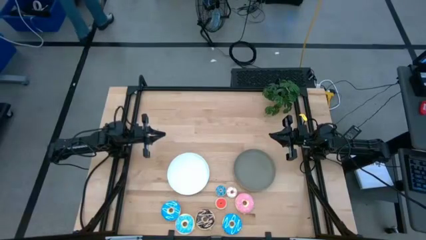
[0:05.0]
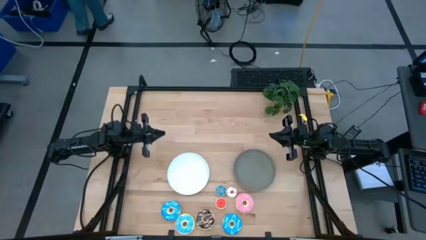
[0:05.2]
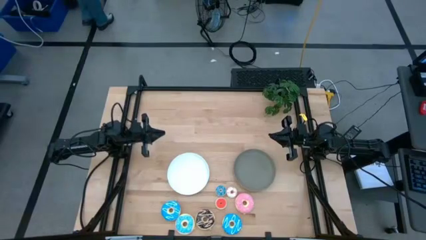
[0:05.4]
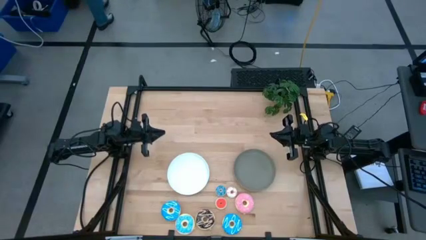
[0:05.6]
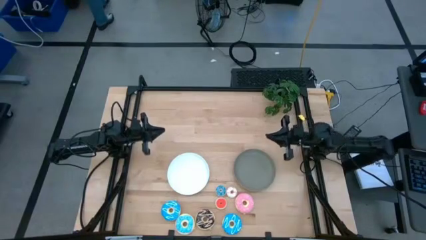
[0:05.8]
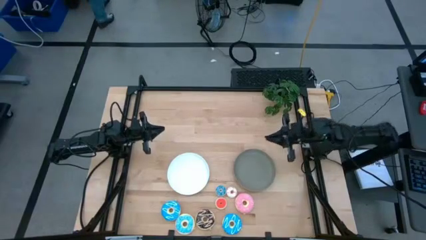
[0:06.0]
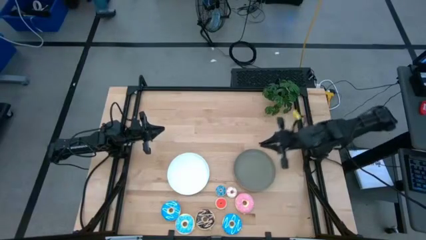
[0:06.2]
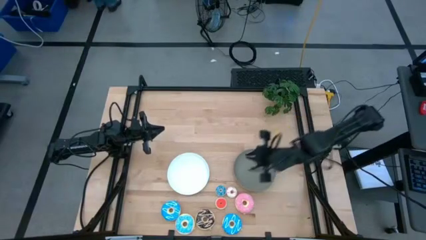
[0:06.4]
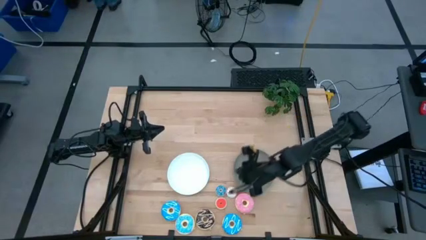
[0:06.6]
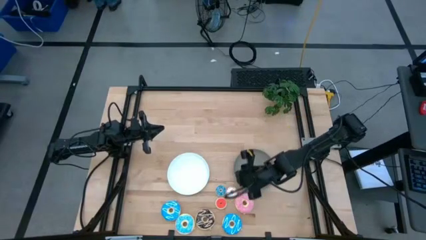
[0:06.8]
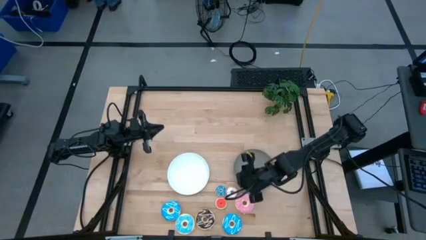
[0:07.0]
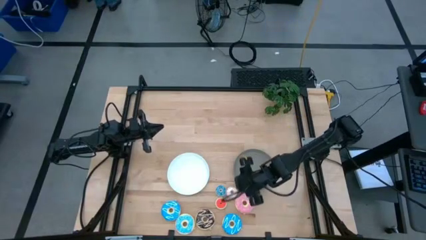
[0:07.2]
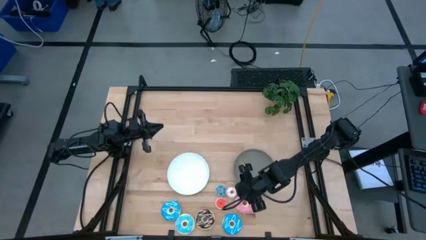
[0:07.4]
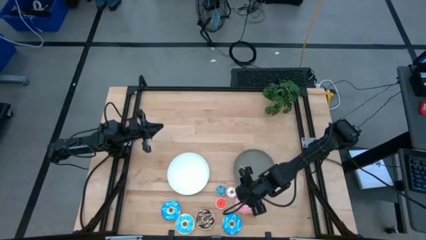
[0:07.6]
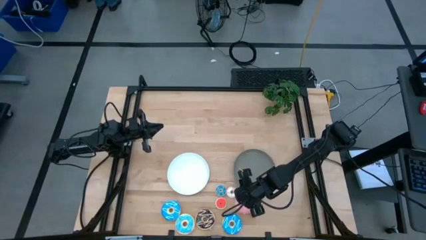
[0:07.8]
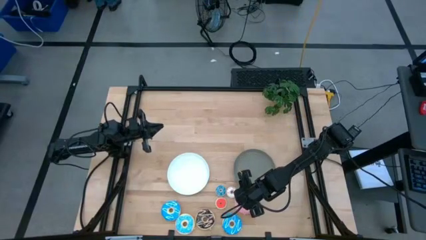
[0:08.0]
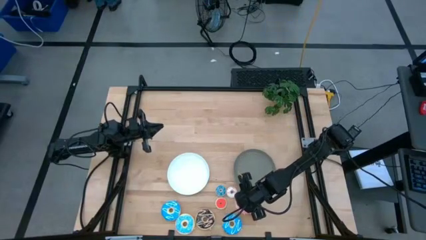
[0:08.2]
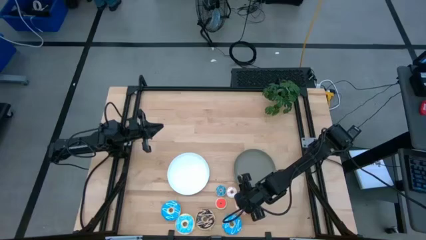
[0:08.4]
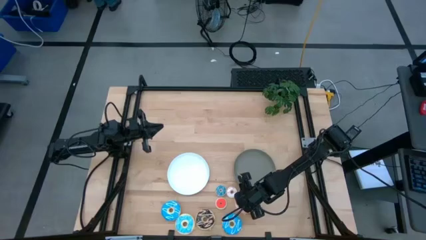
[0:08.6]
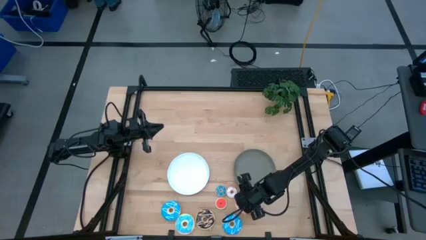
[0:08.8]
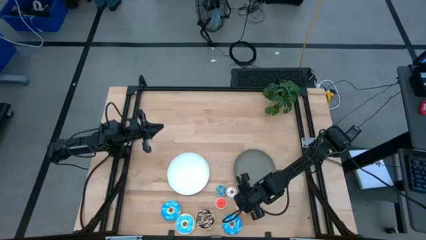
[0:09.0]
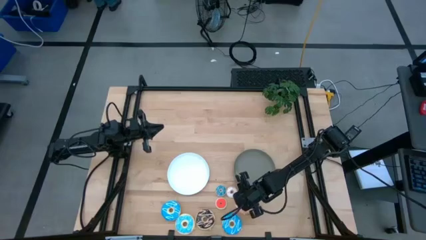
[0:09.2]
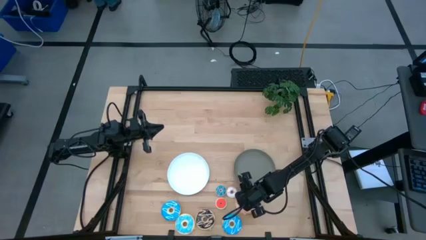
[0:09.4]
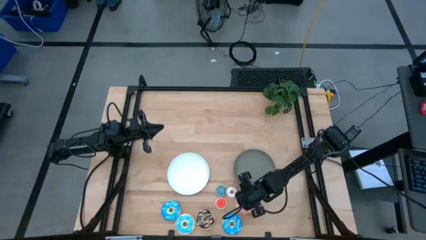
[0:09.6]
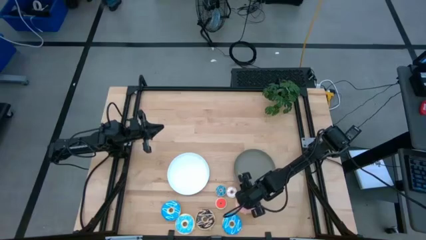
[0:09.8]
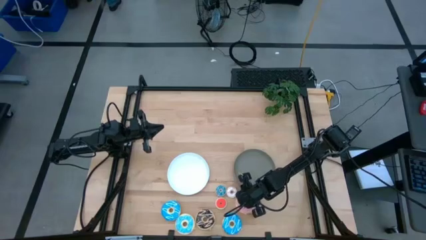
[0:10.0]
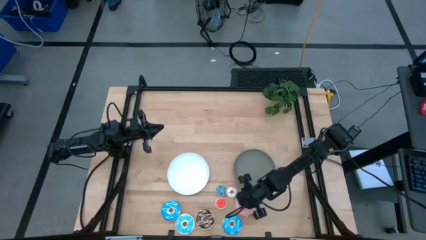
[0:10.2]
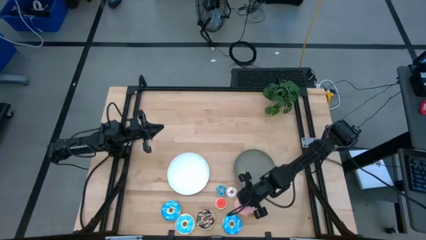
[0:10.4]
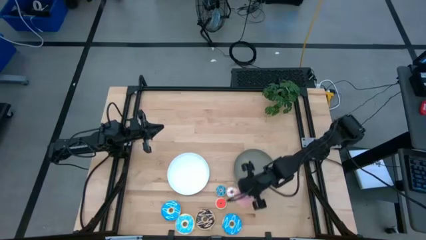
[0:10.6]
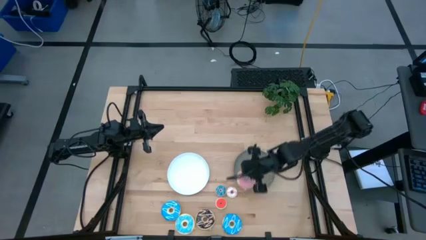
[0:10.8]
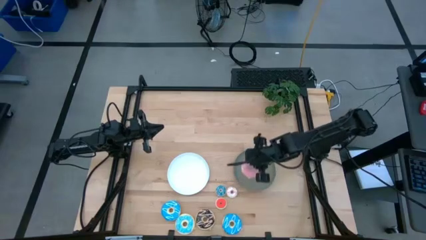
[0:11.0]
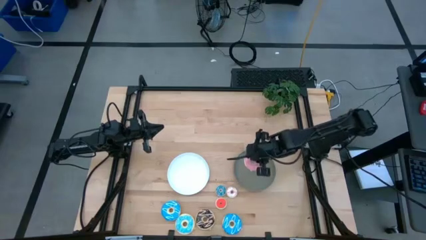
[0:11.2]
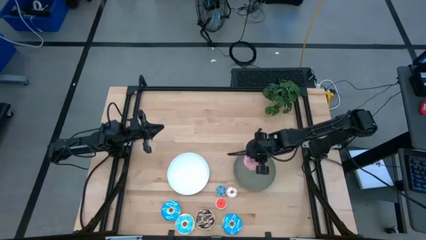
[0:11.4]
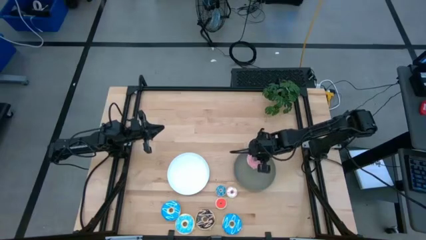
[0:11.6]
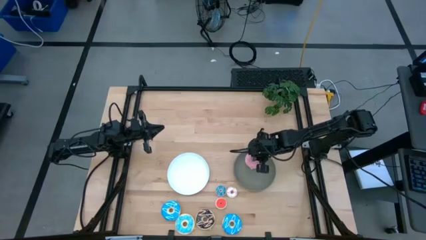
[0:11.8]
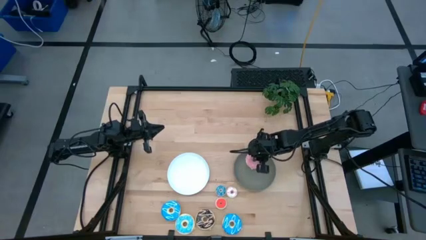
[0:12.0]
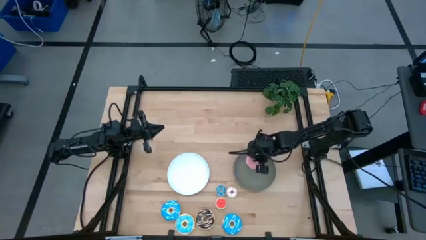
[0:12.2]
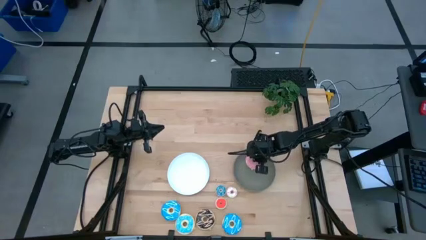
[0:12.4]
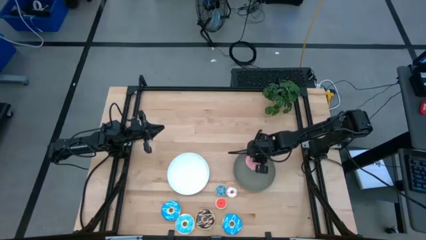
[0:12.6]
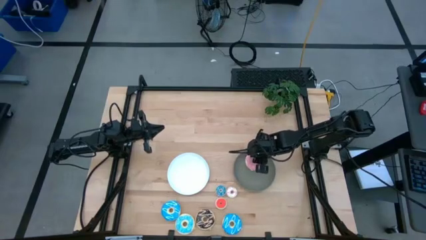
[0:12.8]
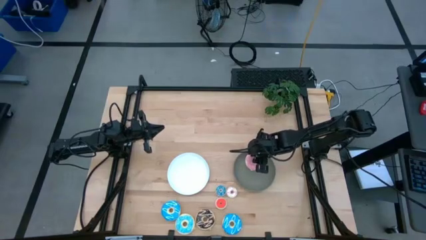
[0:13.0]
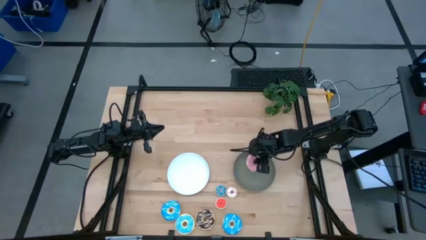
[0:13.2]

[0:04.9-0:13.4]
Task: Pick & Place donuts
Put the large pink donut on the gray plate

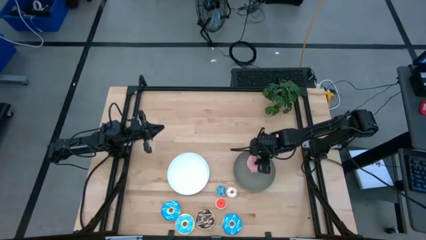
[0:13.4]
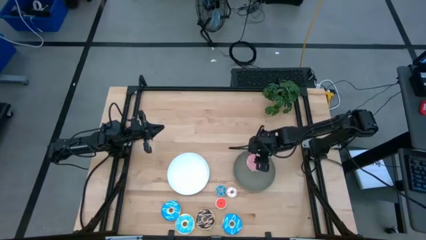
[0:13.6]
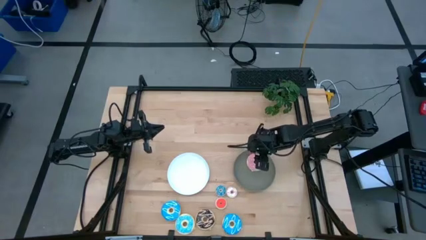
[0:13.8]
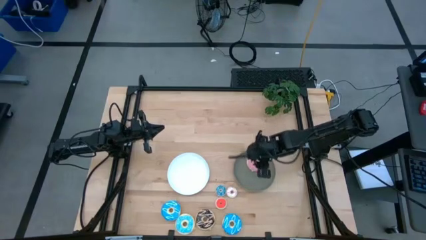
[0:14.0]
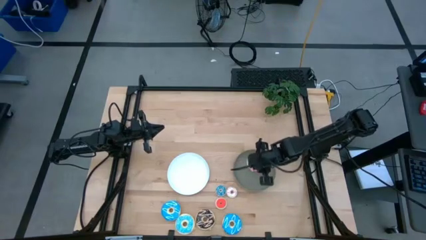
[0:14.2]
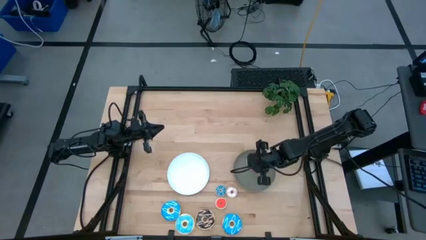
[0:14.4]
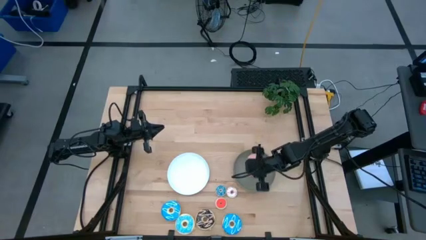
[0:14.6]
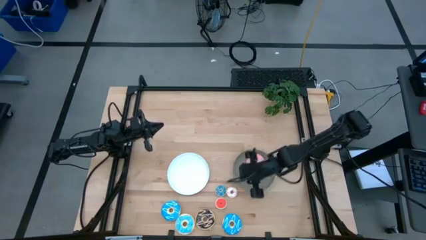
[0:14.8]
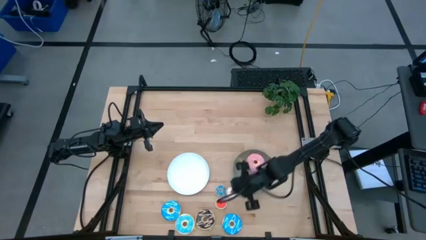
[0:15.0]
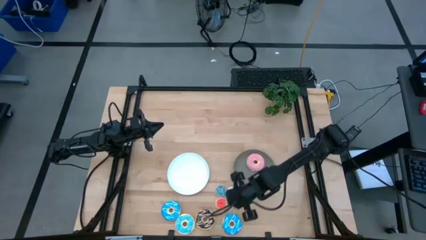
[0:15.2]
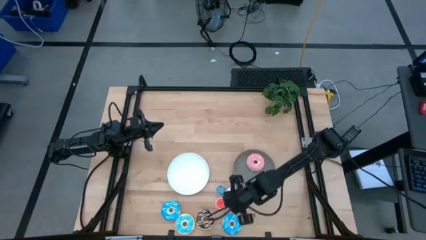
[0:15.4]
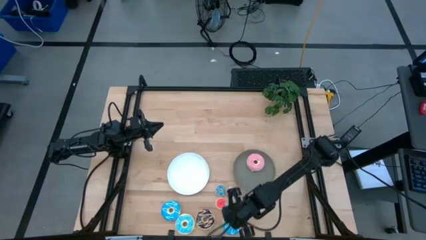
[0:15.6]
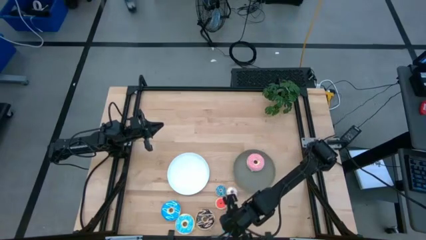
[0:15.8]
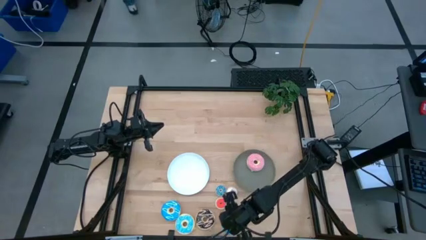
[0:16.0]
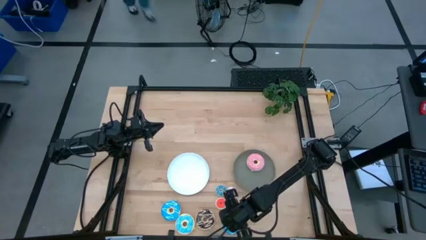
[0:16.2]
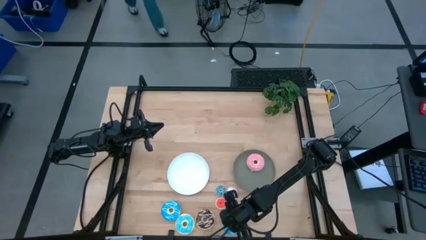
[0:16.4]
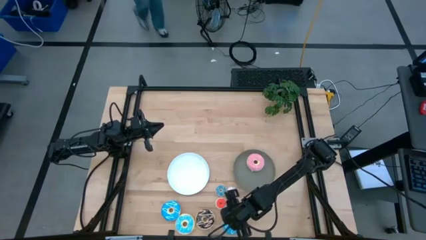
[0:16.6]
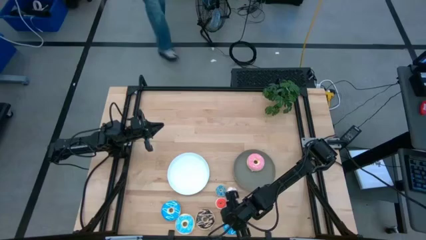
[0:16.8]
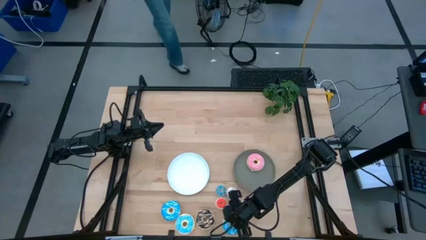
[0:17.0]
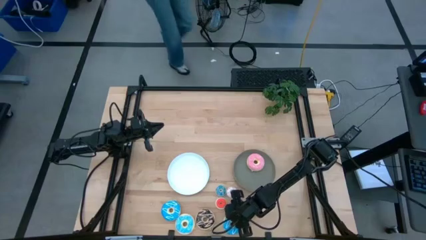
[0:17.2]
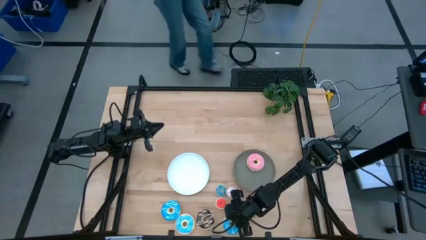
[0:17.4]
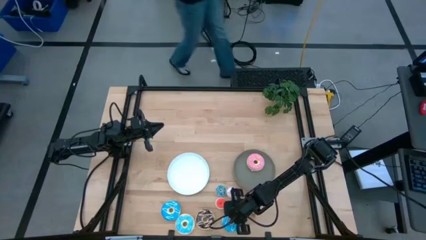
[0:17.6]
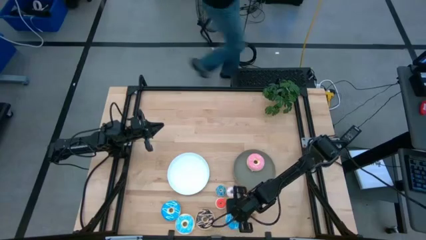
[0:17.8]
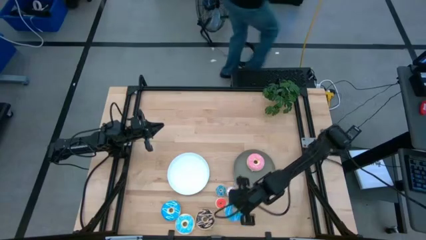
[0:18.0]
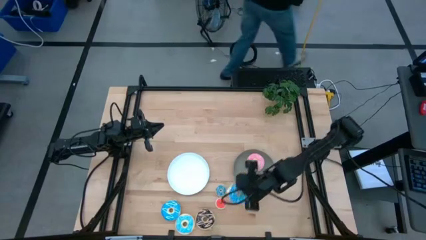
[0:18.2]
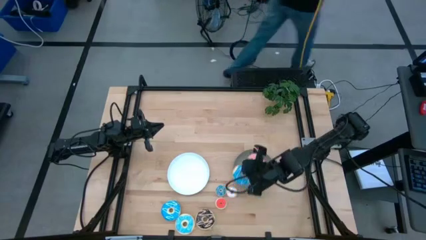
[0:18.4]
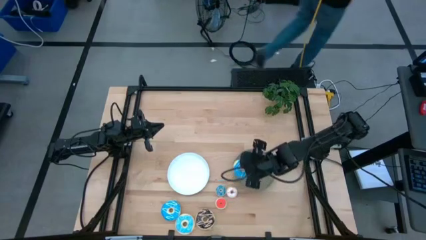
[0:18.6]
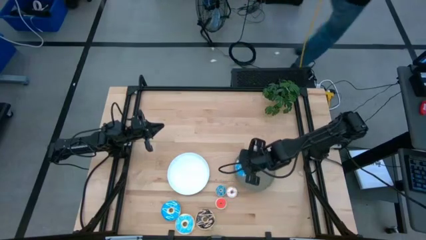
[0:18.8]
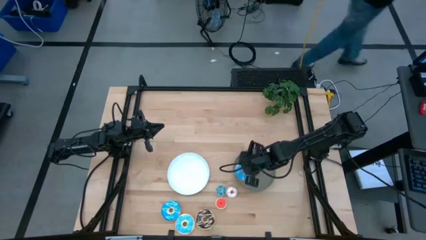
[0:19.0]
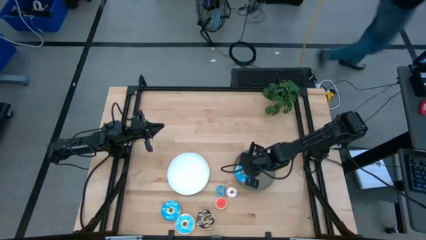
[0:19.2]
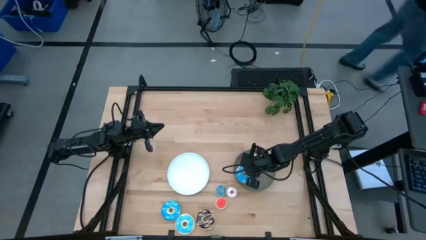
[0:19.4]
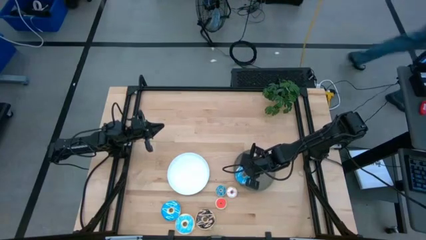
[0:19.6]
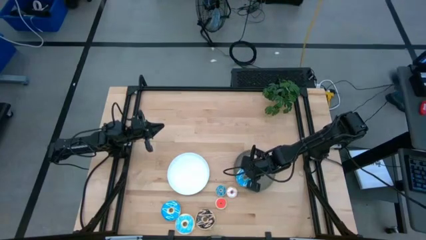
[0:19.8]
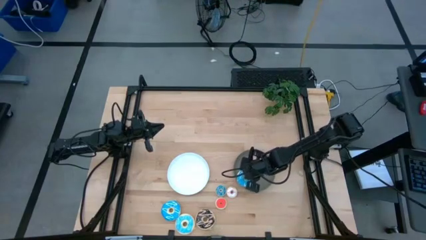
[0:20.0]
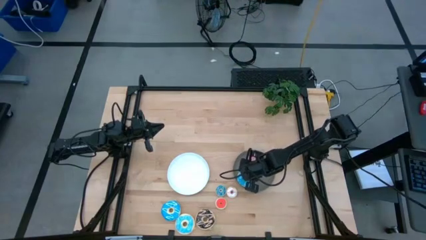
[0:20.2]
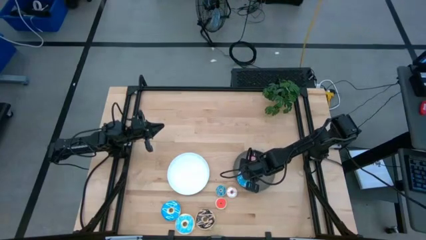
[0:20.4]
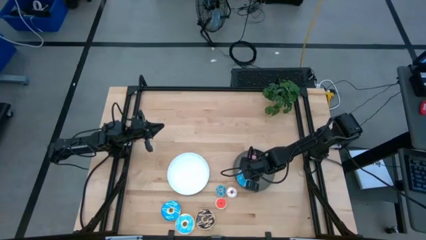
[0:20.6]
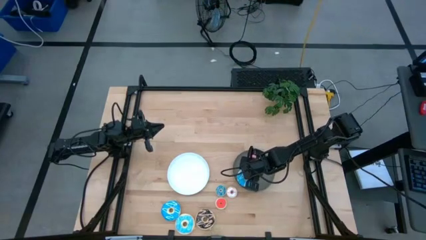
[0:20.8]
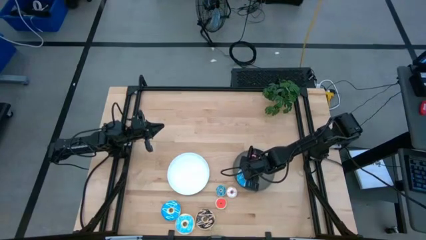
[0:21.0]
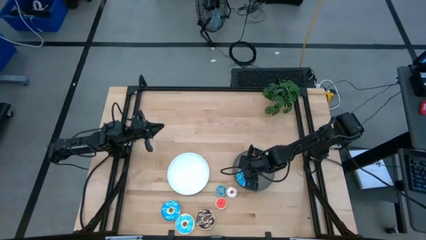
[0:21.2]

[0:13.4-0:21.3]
Put the large blue right donut on the gray plate
